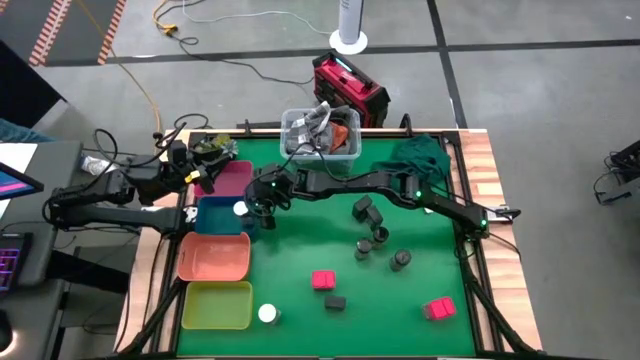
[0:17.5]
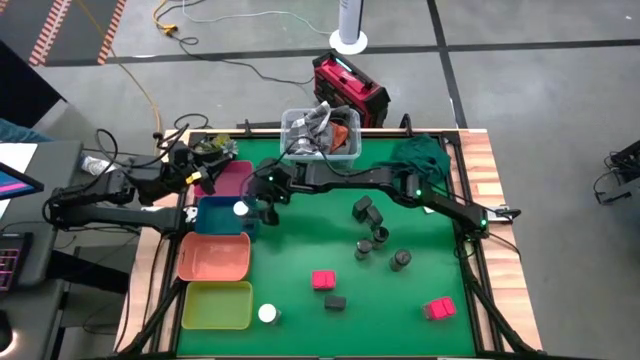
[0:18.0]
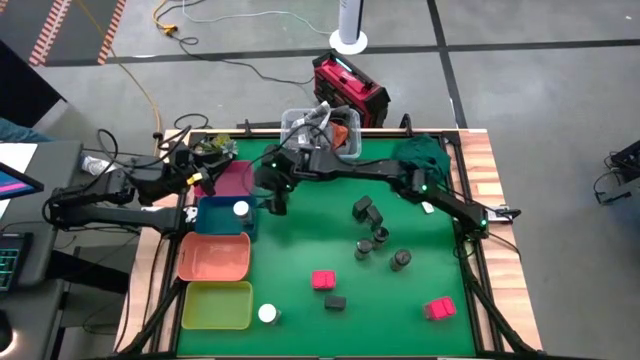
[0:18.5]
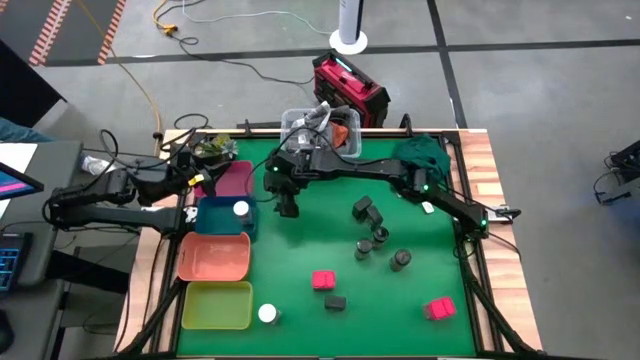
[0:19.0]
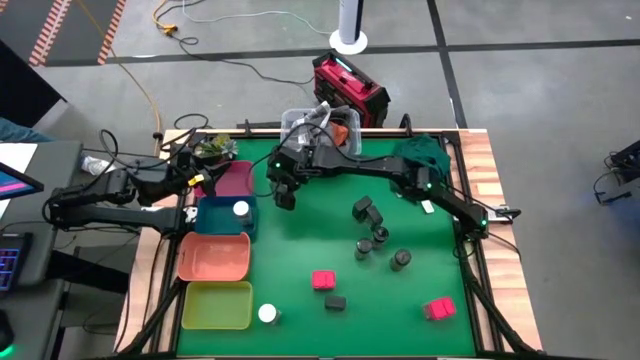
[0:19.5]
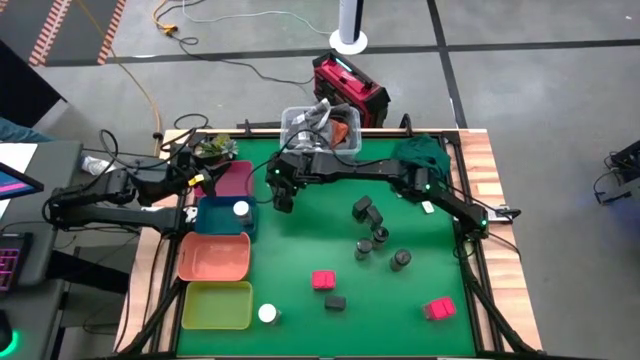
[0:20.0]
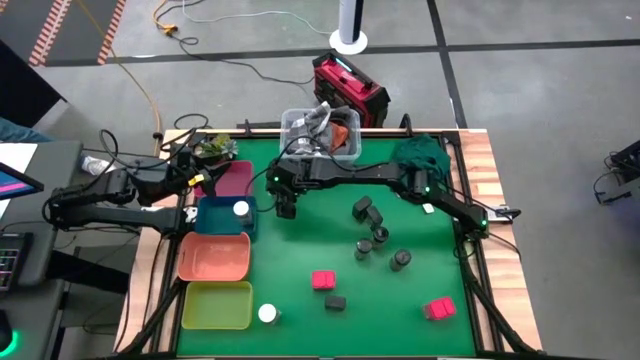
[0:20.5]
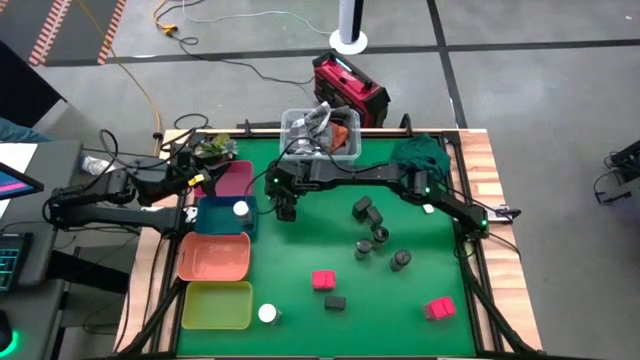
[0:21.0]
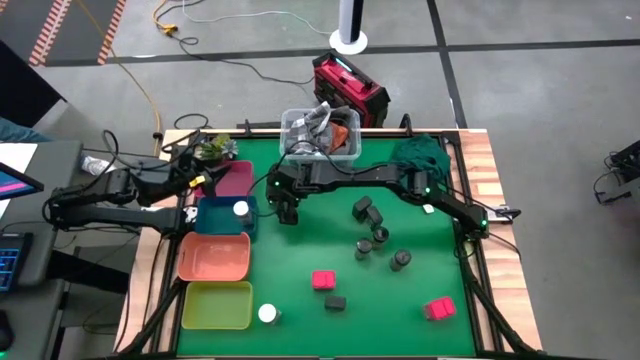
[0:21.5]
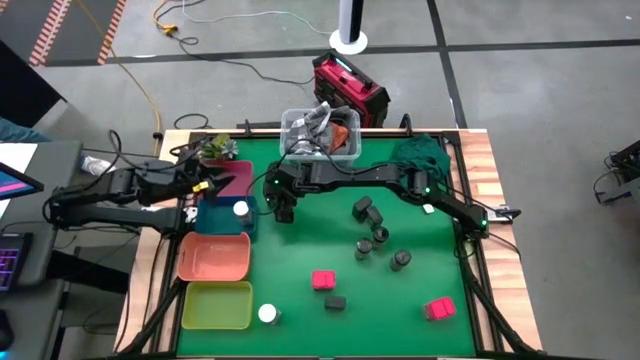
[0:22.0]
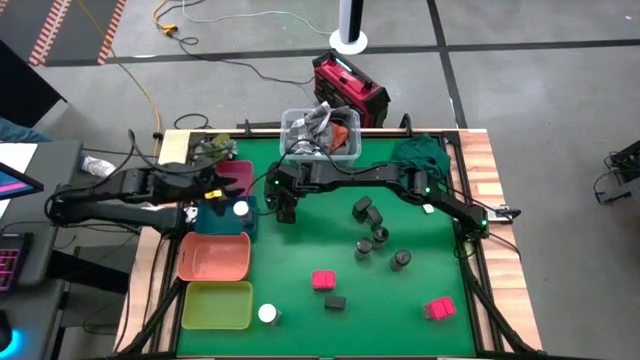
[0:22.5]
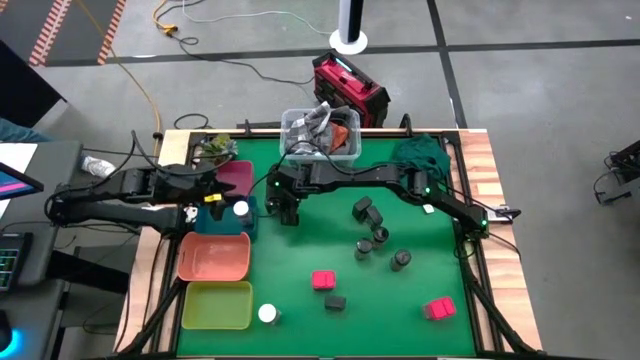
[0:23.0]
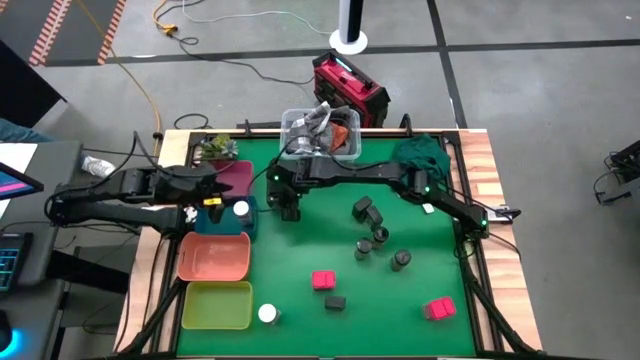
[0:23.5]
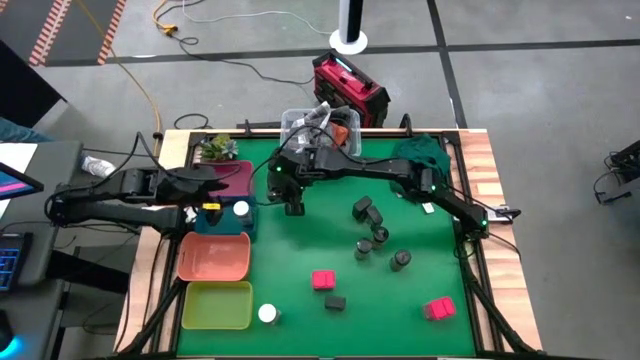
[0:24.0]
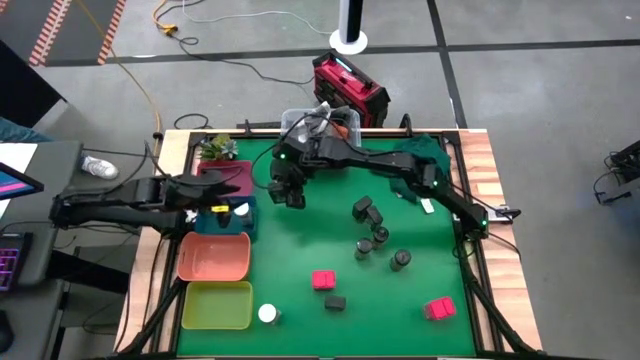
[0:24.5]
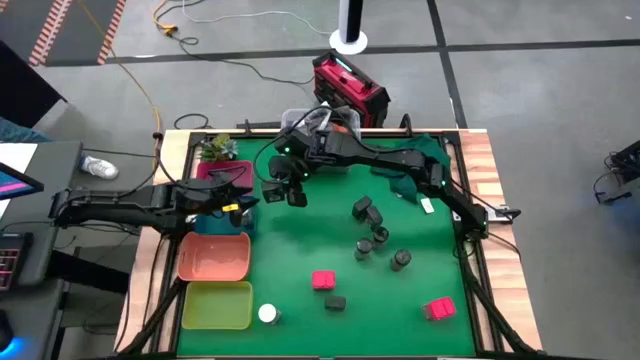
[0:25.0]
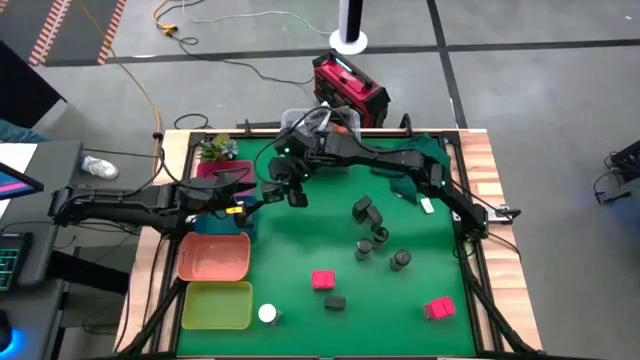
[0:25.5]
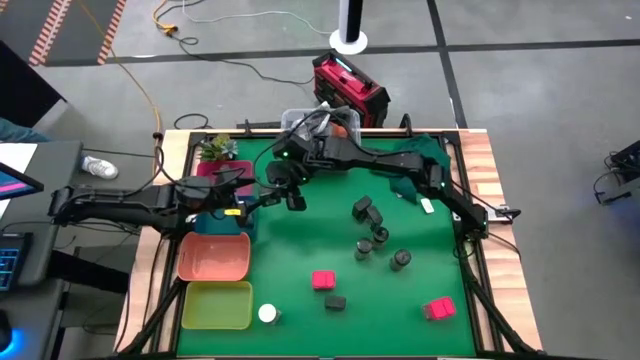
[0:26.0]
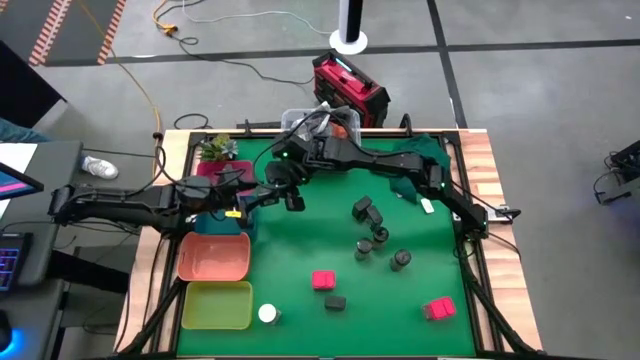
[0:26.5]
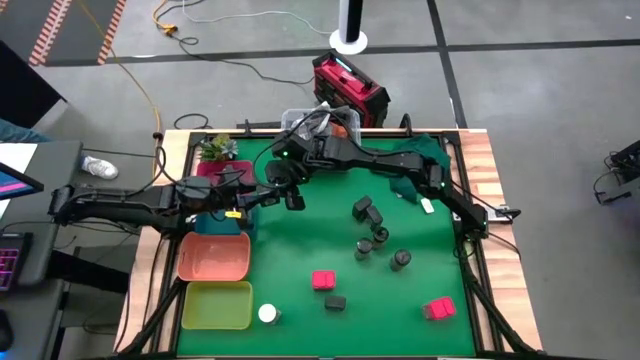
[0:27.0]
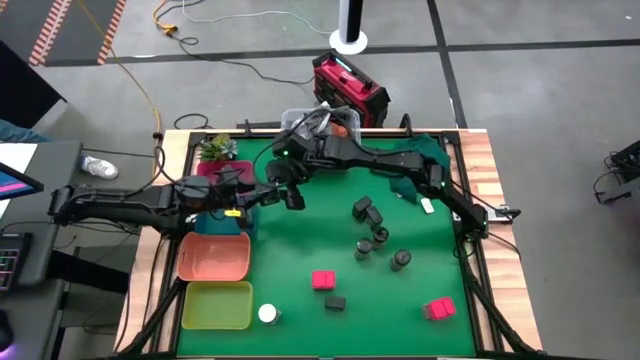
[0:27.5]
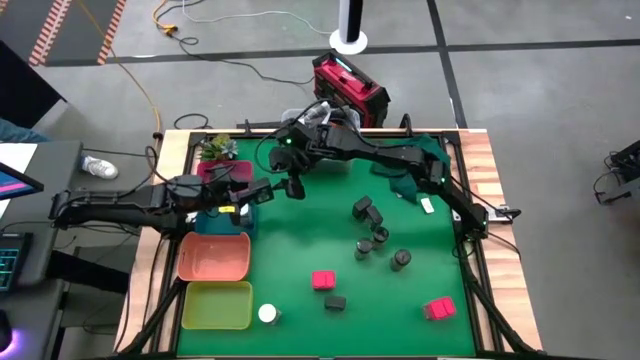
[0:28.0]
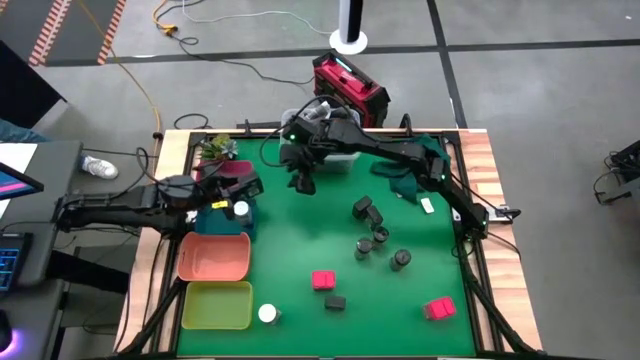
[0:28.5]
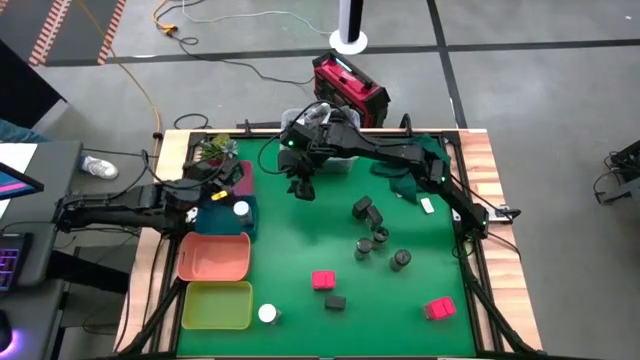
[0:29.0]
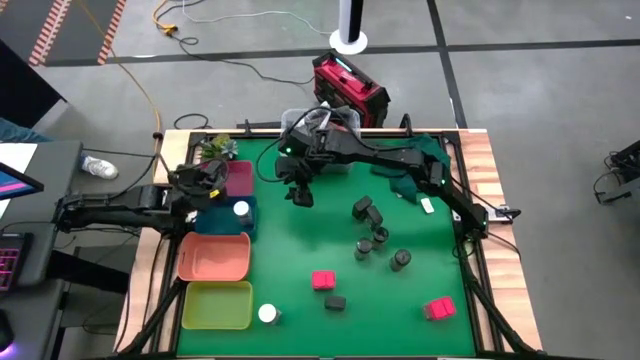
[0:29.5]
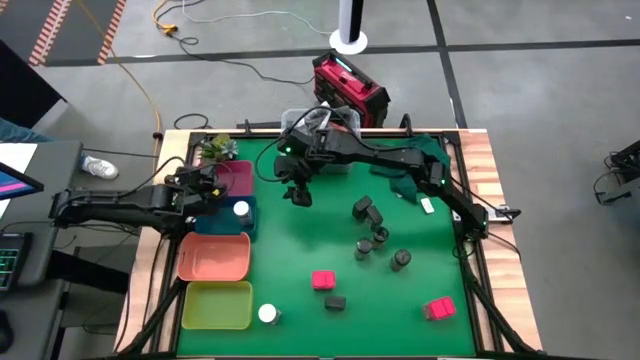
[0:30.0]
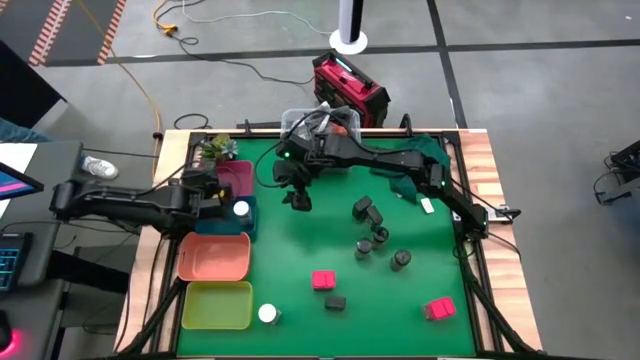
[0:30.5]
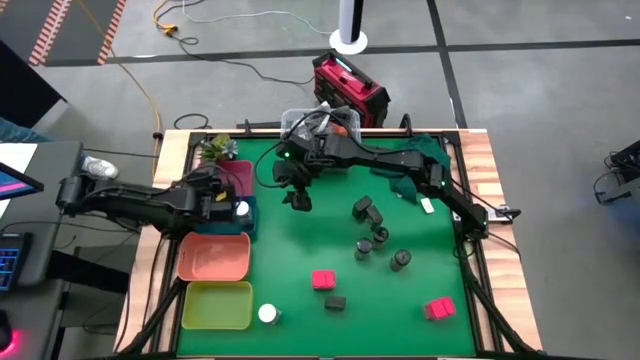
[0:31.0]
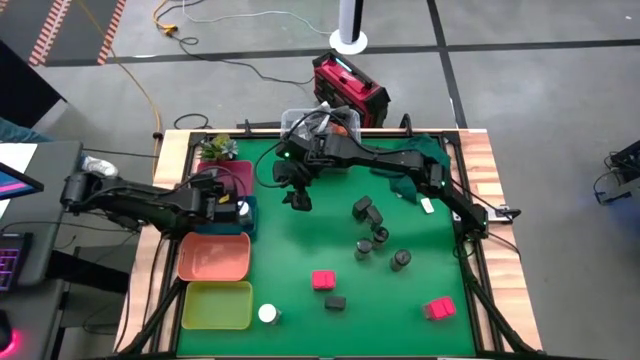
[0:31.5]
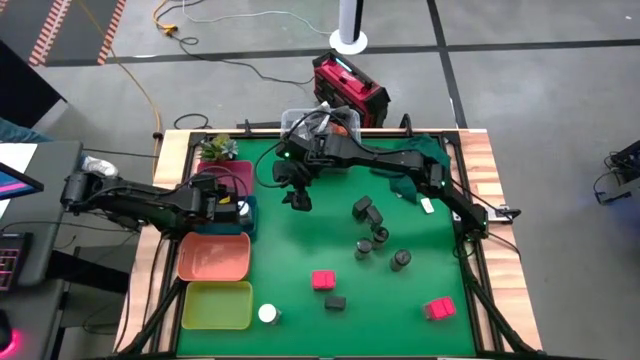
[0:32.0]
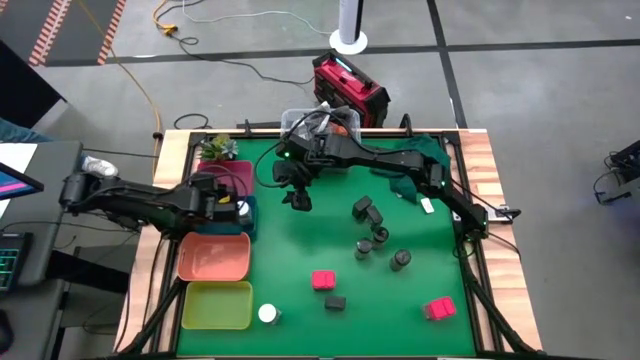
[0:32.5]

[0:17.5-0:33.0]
Task: Sort spices by type
Put the top left green seasoning can into the red bin

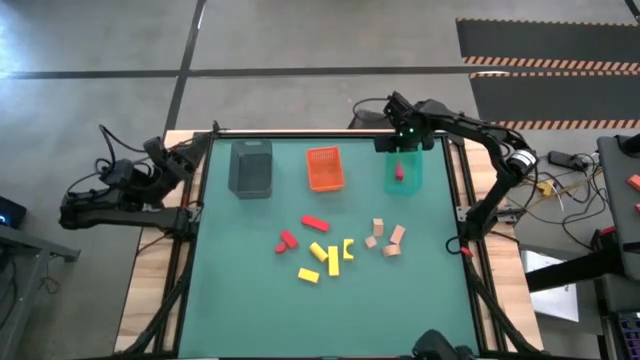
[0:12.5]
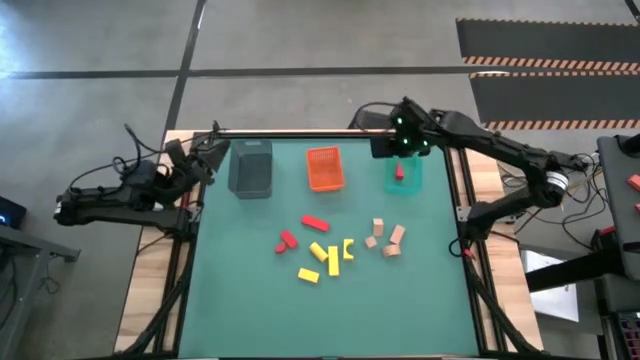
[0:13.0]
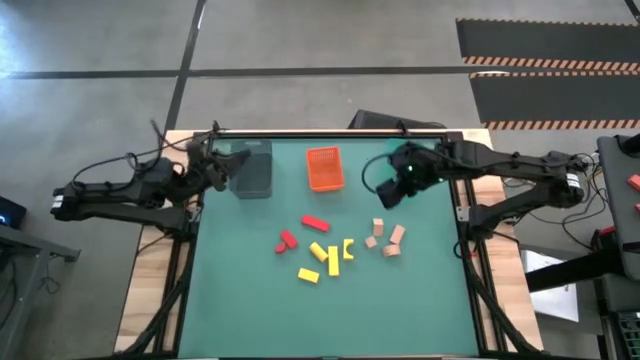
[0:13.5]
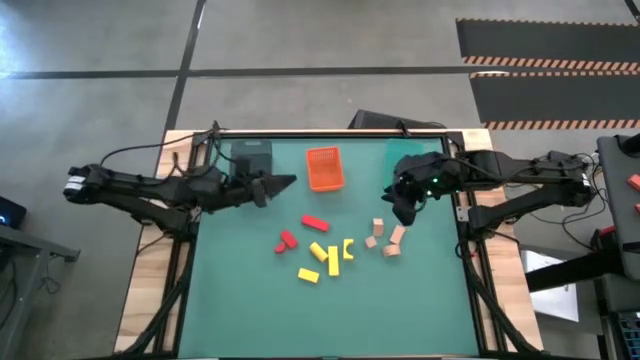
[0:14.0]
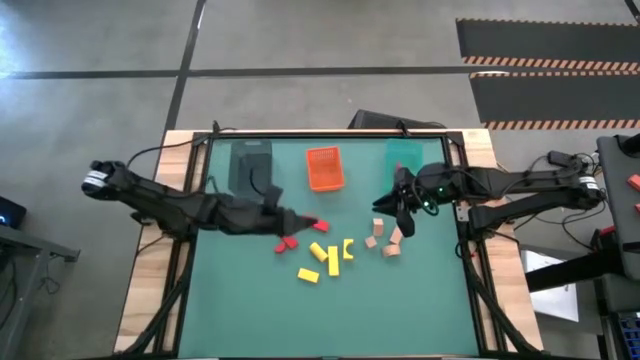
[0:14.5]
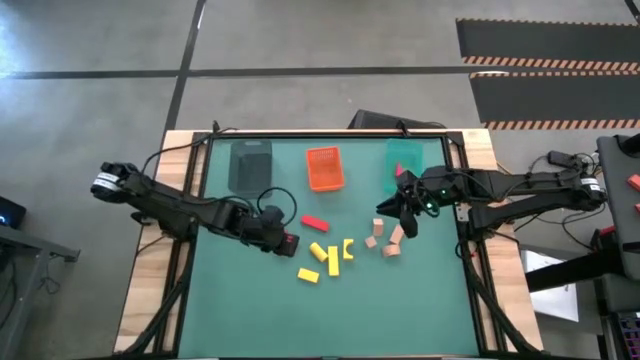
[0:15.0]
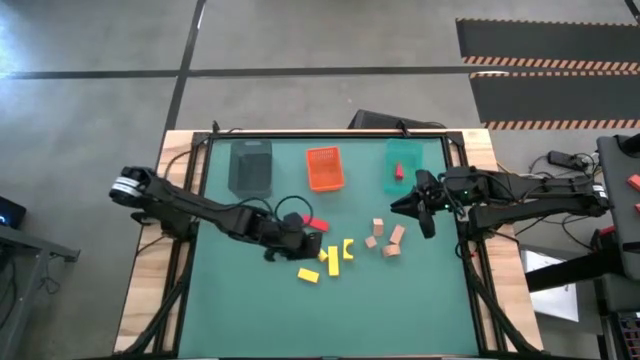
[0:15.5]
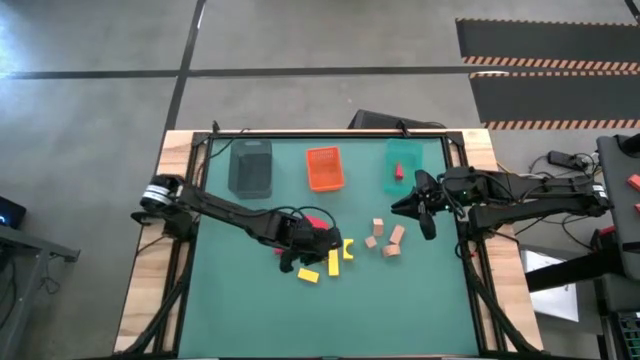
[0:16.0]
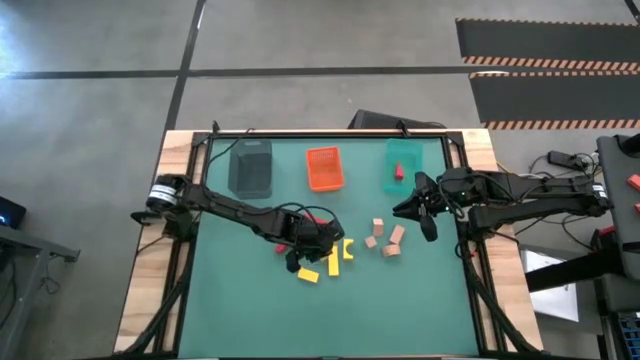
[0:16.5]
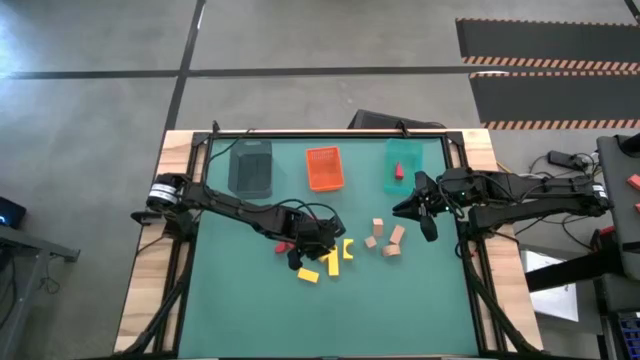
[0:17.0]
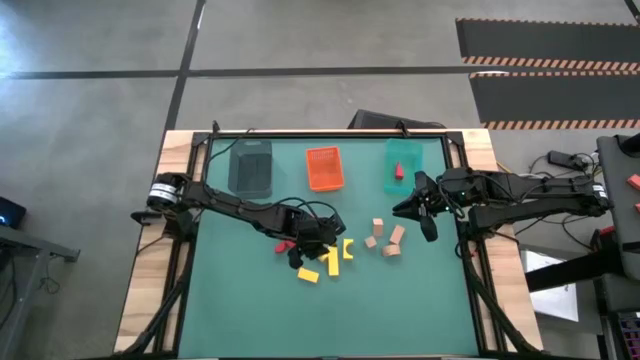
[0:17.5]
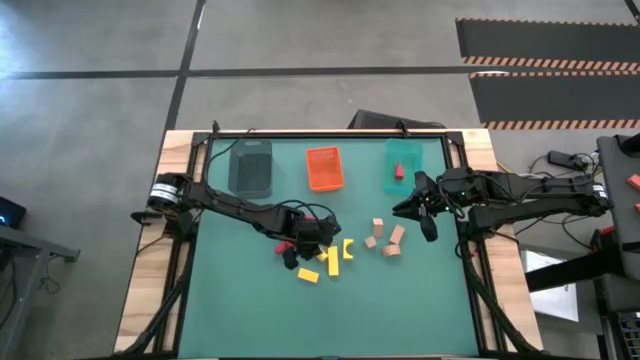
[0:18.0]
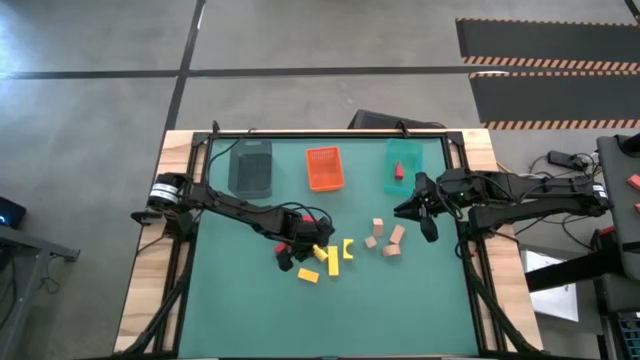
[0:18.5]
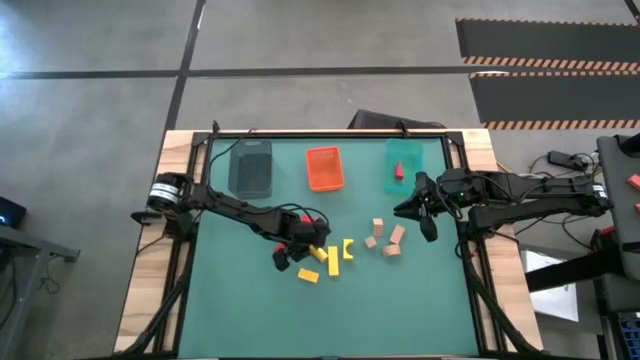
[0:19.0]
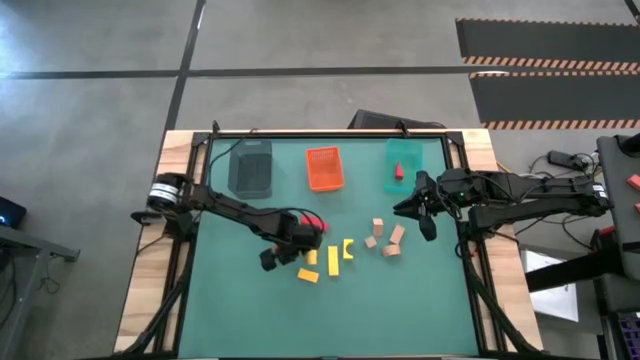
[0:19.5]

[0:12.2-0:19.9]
Task: Sort & place blocks by color
Put the yellow block into the black bin
